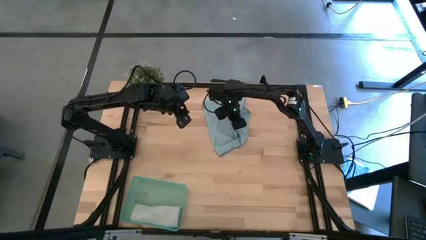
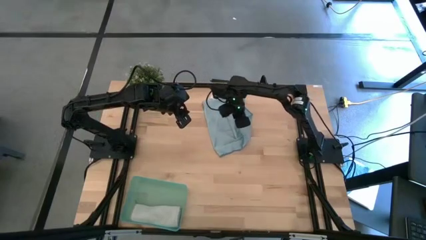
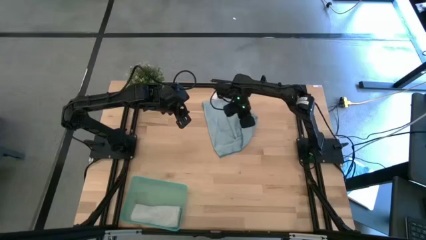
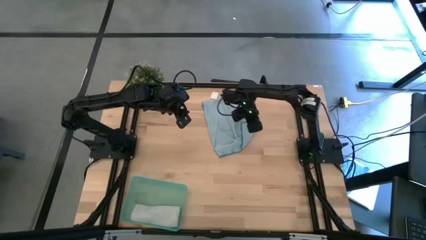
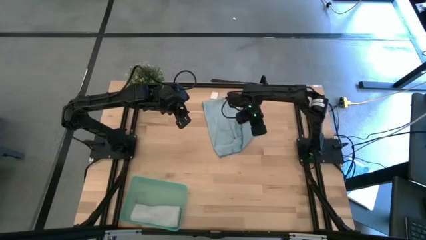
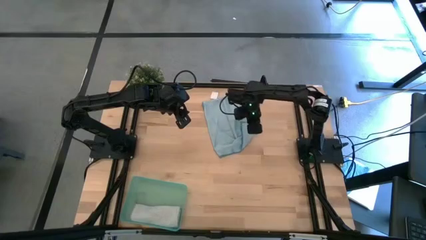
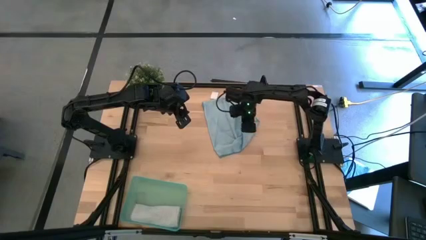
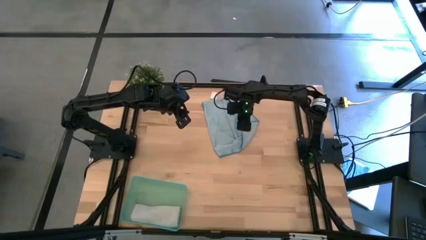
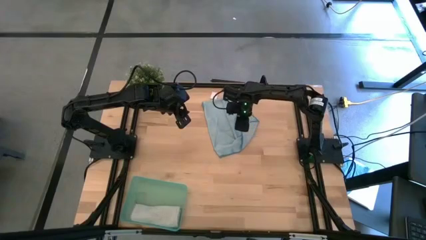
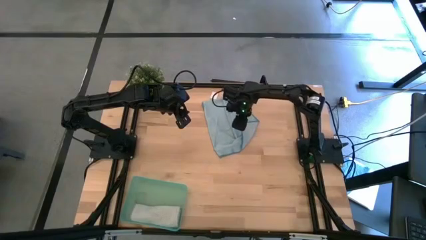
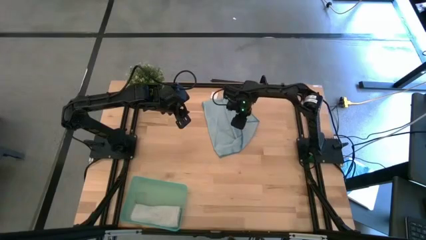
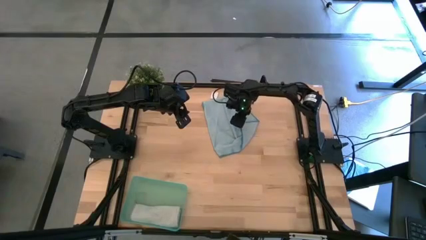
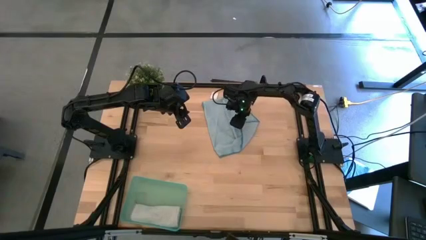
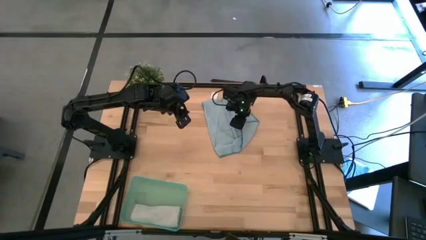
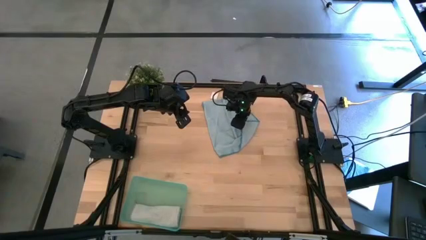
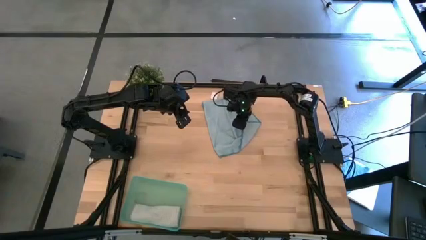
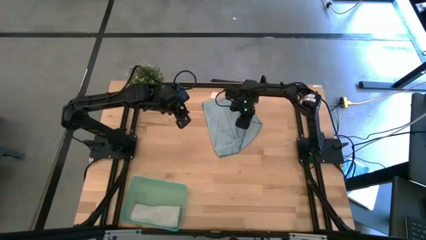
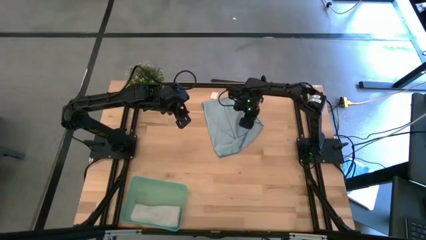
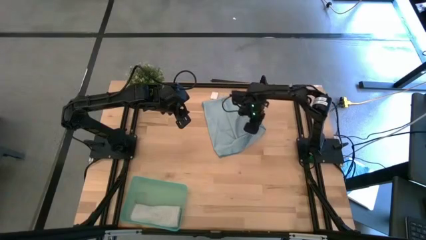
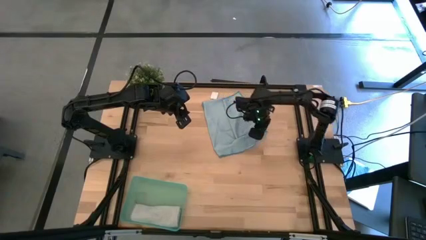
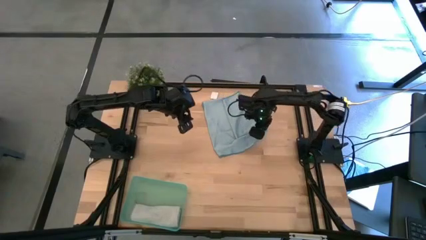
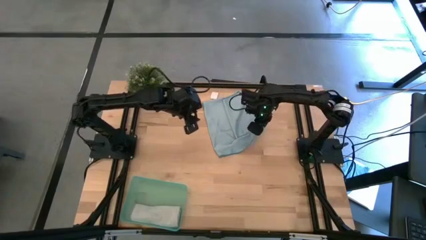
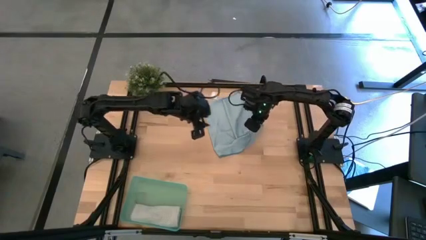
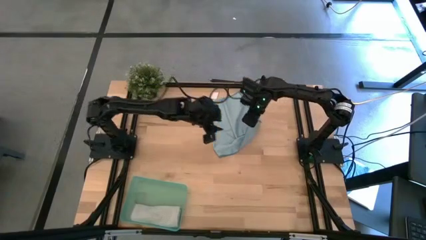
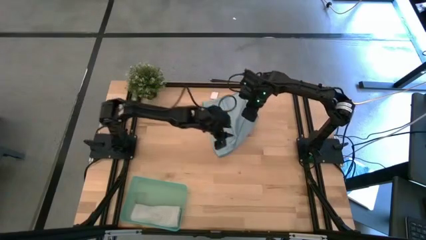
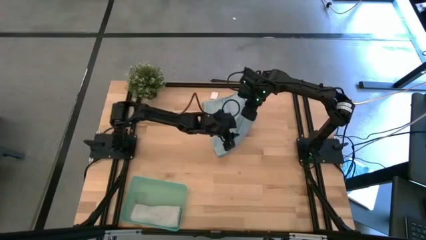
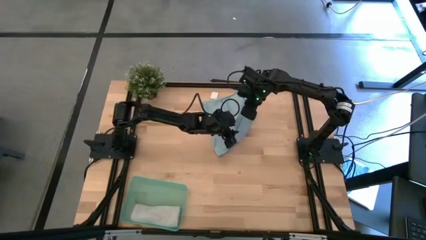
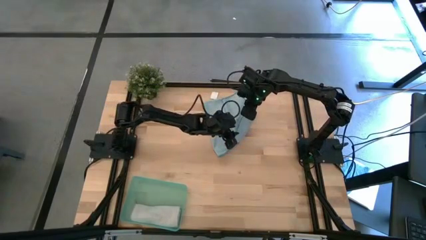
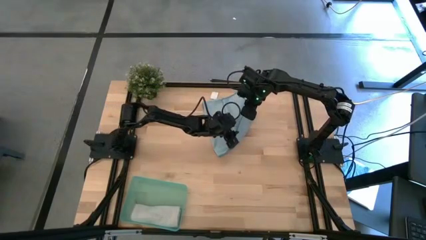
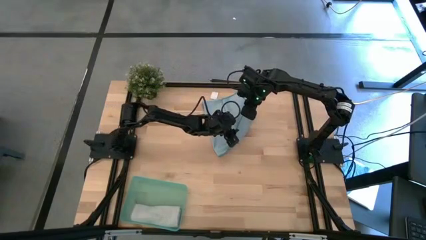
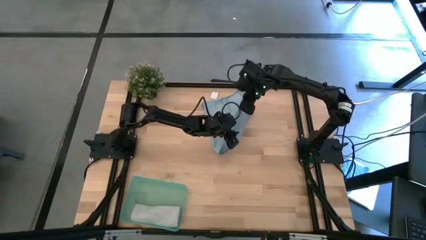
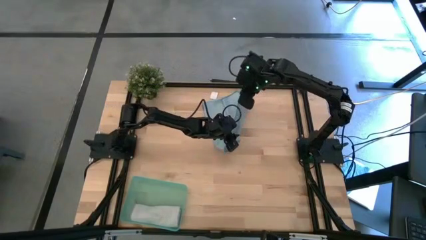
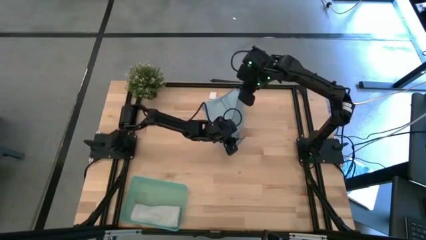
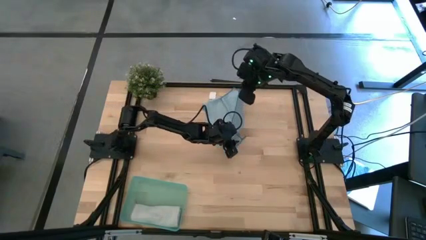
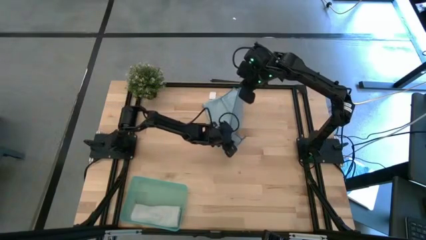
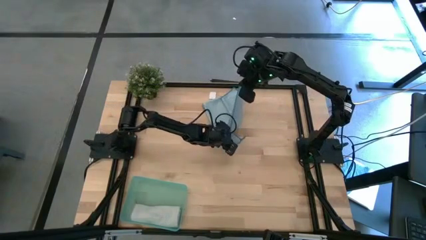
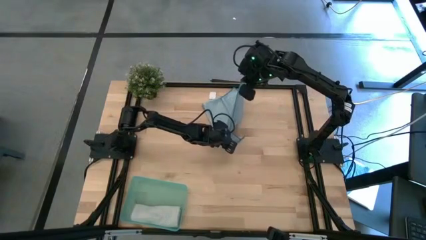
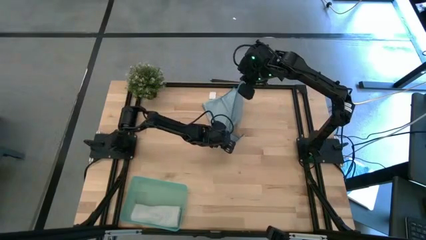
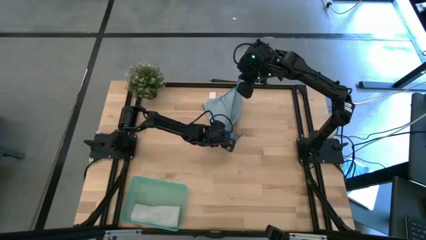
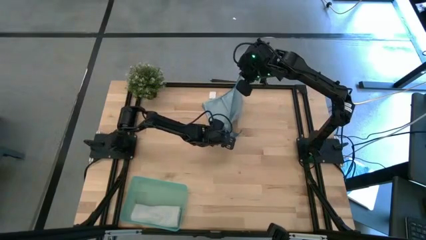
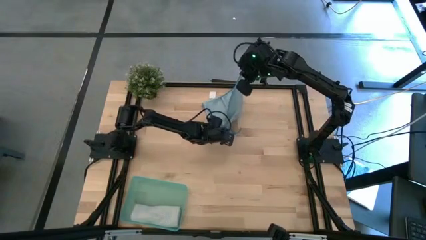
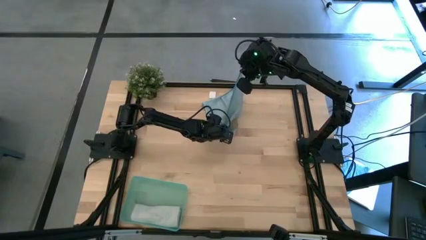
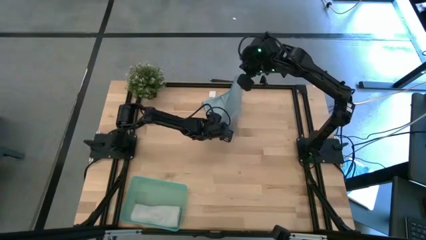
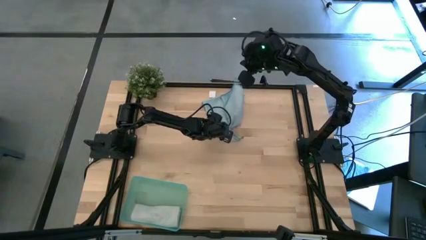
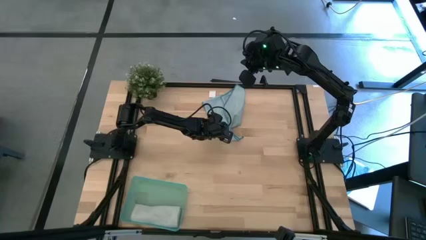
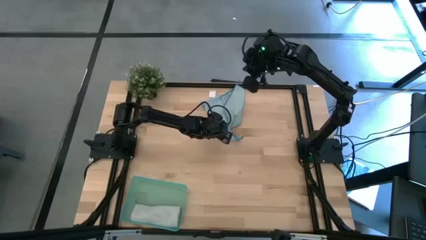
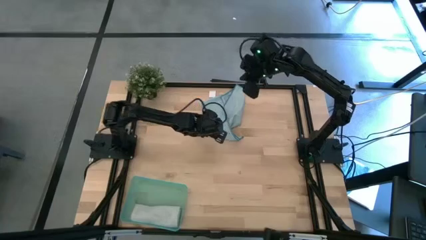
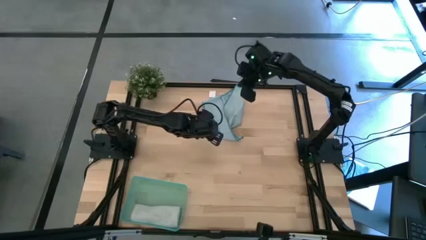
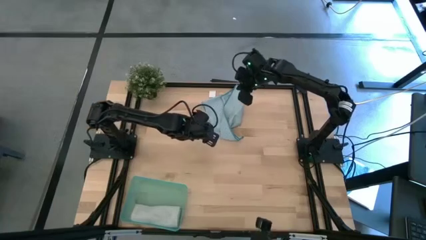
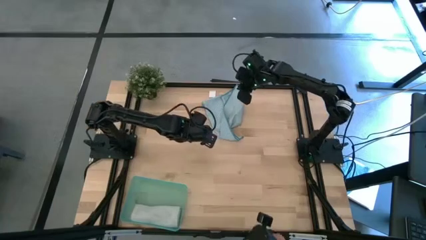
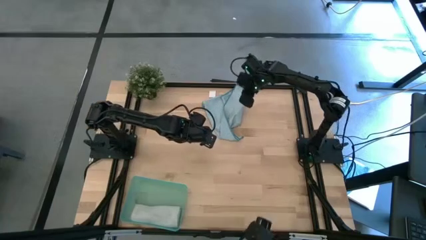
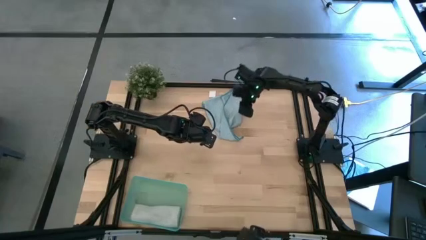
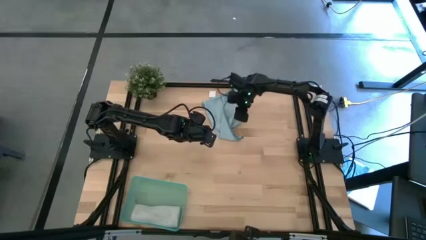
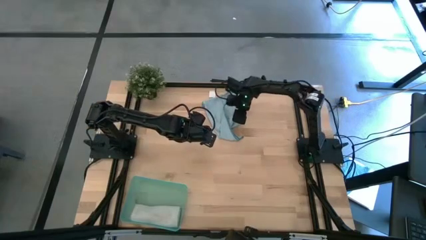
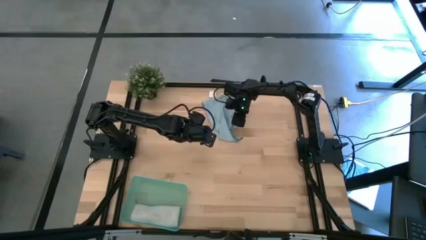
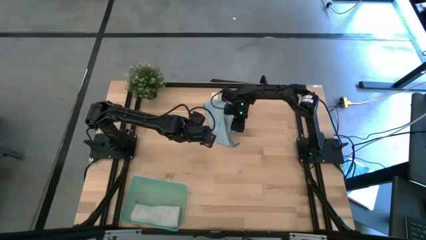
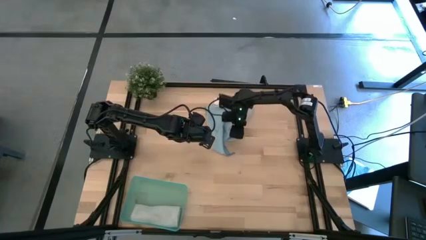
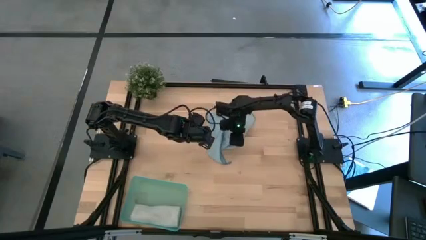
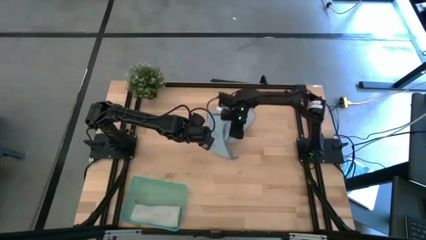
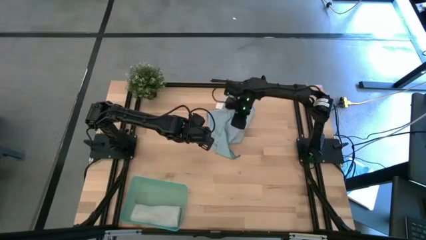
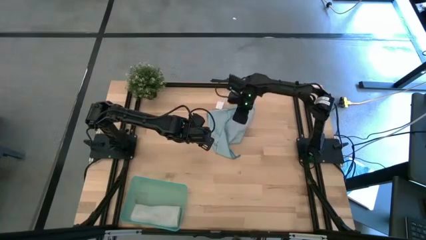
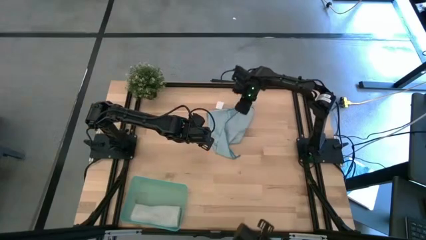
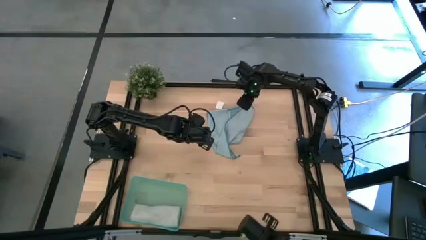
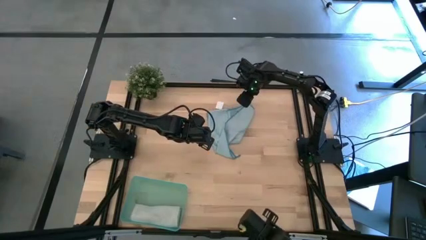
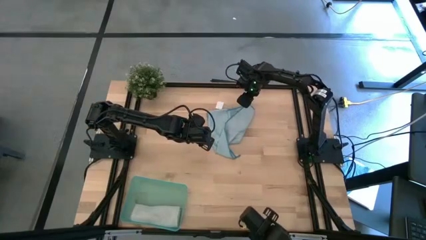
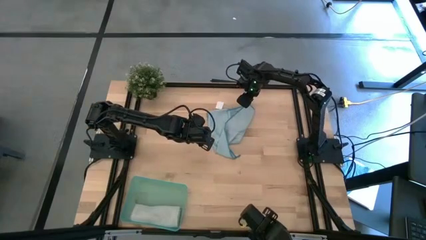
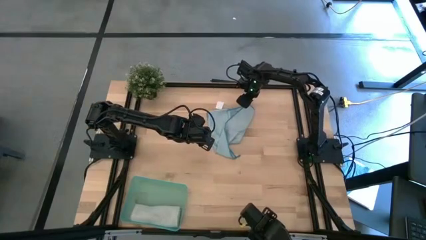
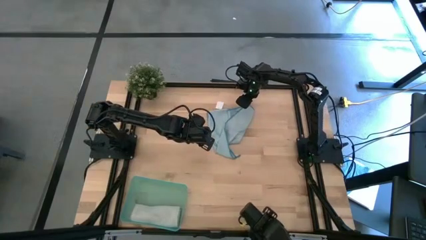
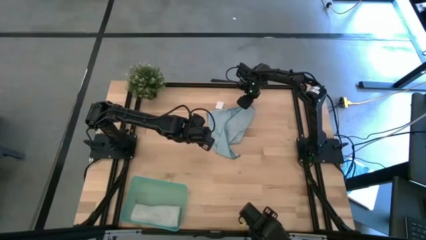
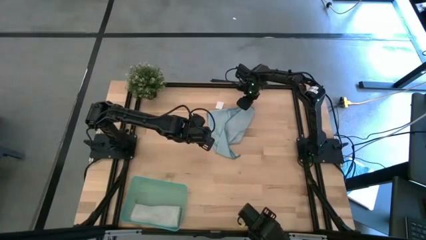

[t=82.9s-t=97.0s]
Task: Roll microfiber towels into tight, uniform cylinder then place into a basket
Roll the blue microfiber cloth
